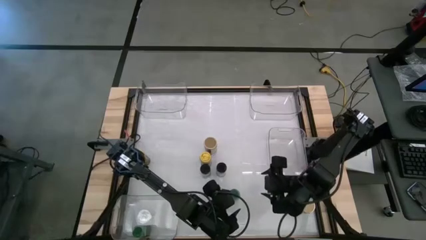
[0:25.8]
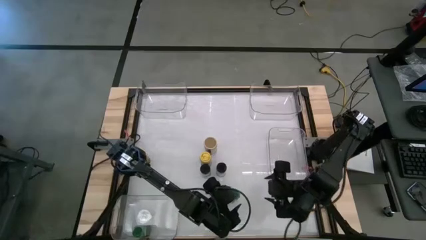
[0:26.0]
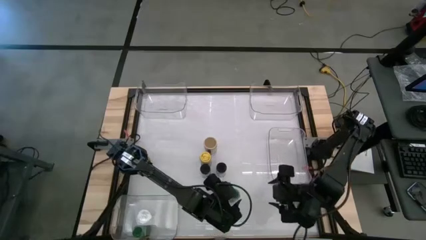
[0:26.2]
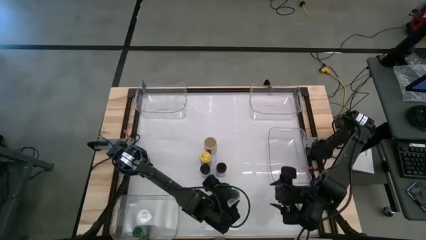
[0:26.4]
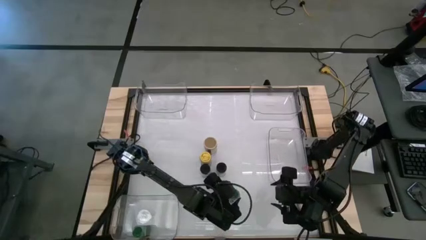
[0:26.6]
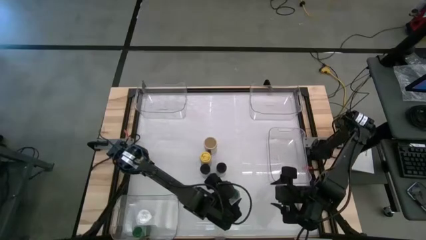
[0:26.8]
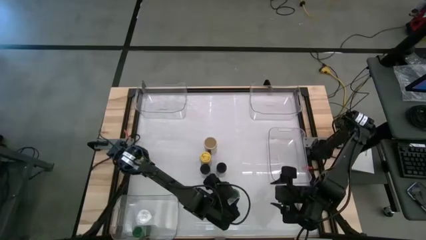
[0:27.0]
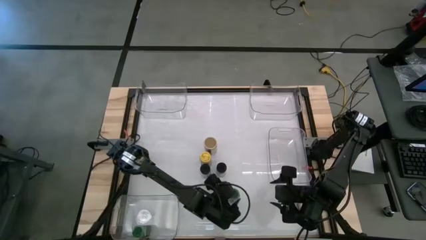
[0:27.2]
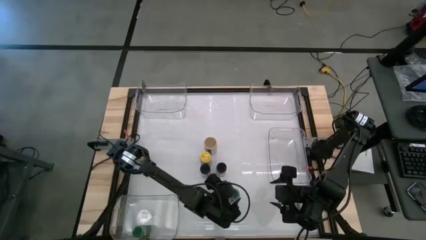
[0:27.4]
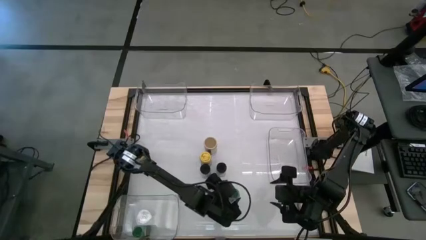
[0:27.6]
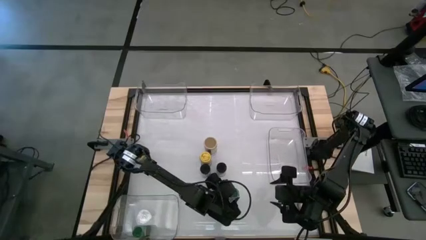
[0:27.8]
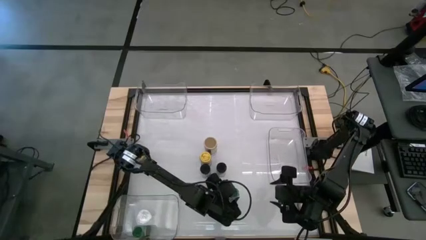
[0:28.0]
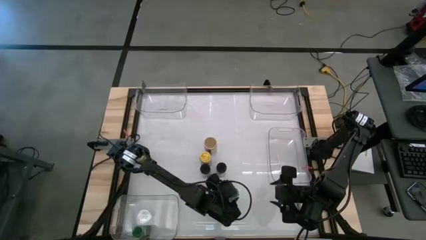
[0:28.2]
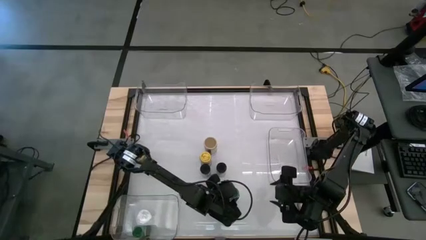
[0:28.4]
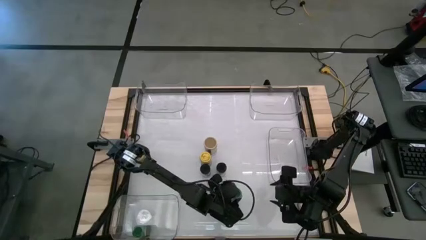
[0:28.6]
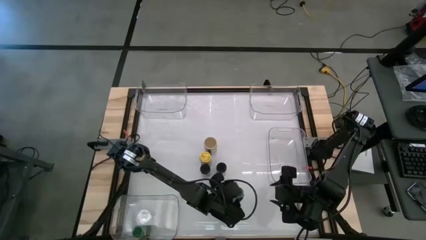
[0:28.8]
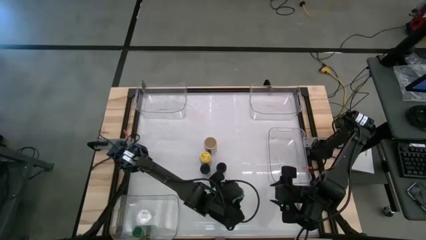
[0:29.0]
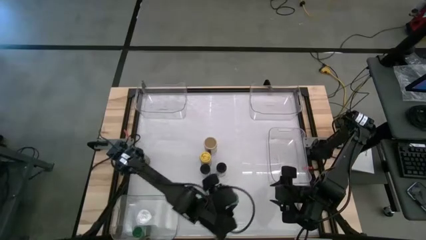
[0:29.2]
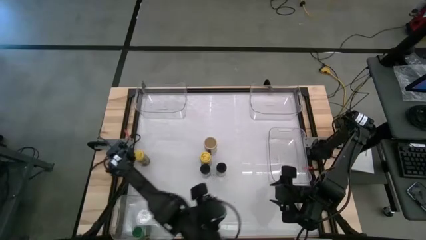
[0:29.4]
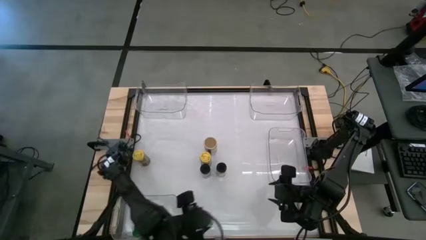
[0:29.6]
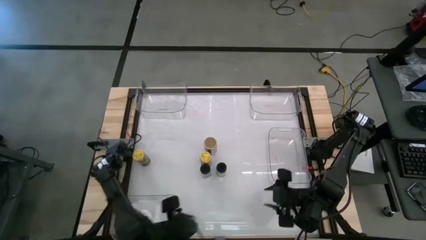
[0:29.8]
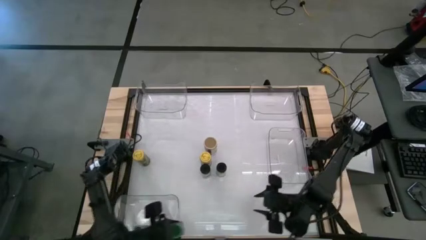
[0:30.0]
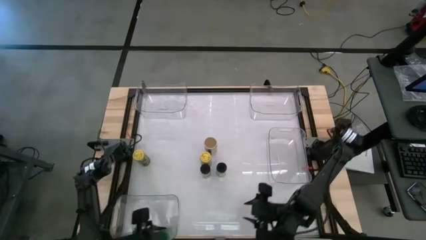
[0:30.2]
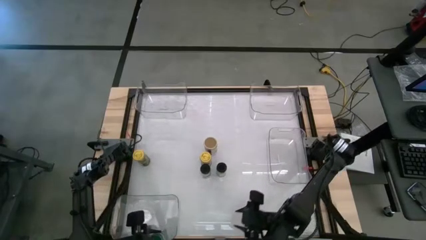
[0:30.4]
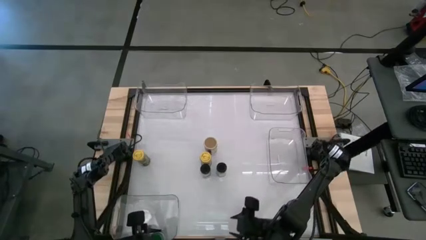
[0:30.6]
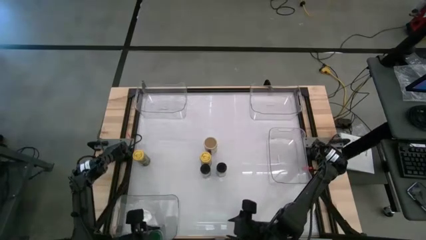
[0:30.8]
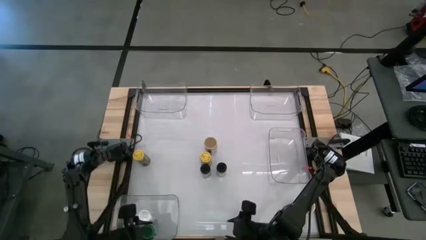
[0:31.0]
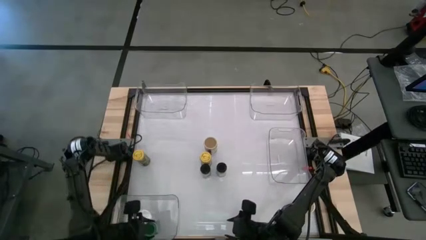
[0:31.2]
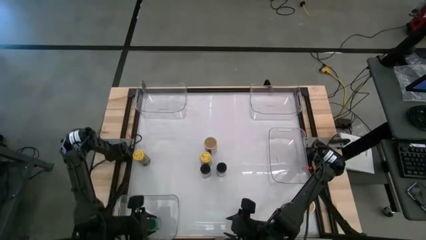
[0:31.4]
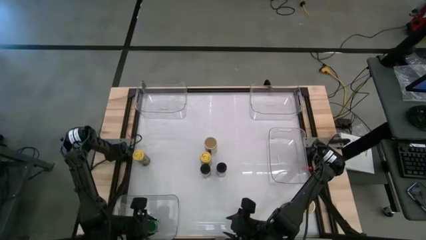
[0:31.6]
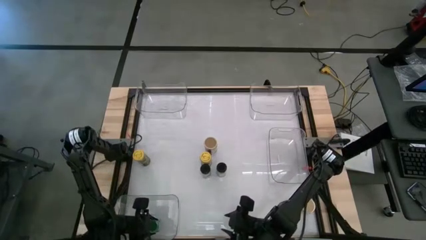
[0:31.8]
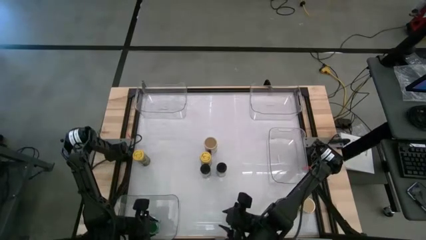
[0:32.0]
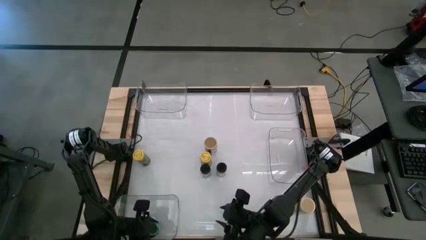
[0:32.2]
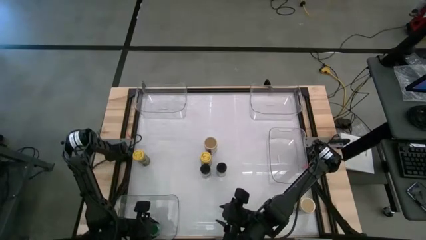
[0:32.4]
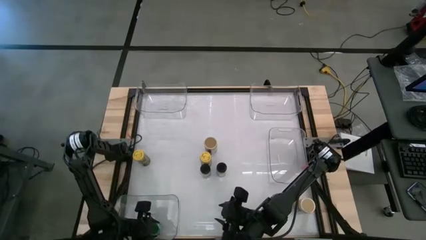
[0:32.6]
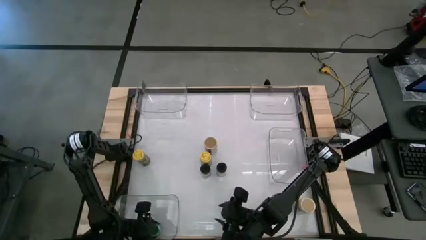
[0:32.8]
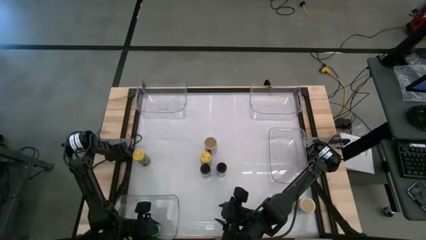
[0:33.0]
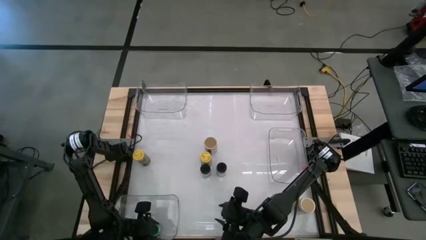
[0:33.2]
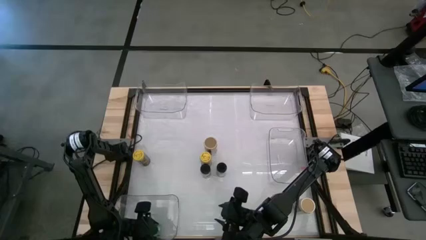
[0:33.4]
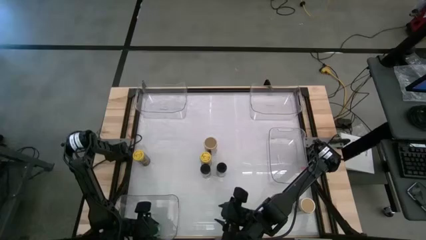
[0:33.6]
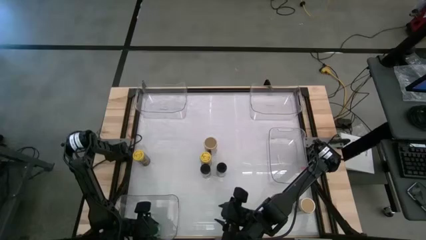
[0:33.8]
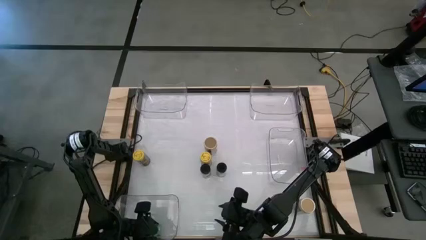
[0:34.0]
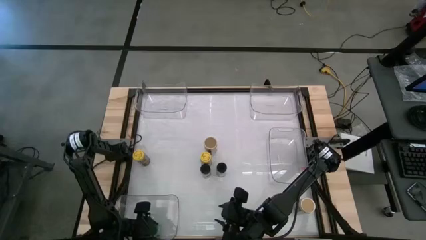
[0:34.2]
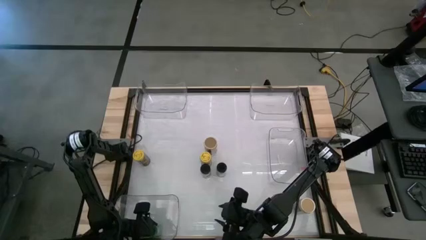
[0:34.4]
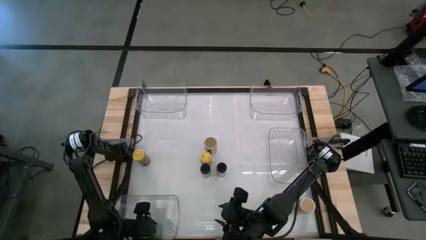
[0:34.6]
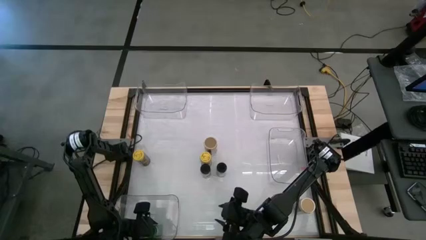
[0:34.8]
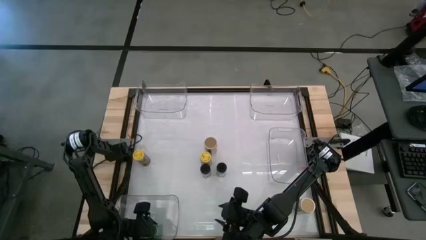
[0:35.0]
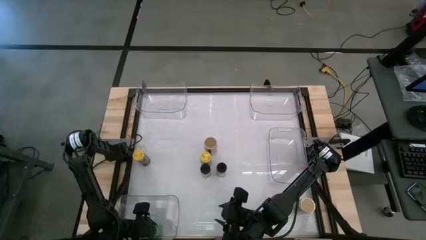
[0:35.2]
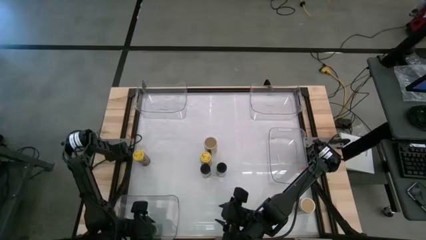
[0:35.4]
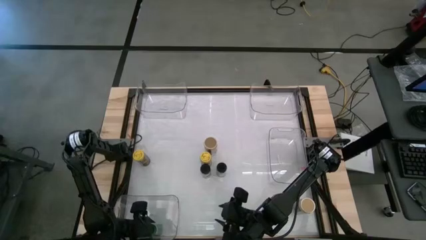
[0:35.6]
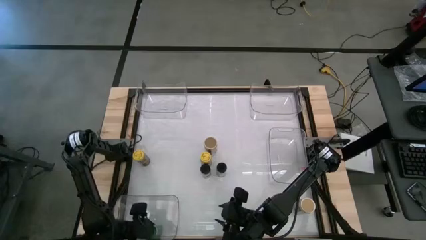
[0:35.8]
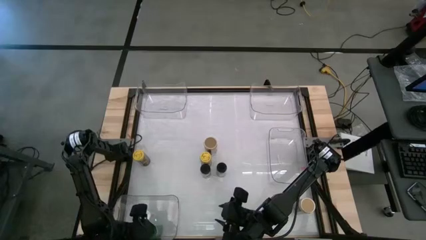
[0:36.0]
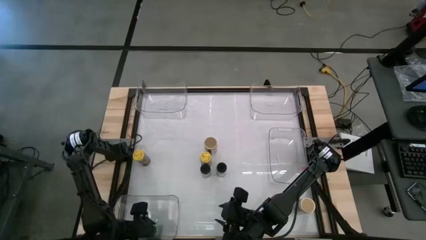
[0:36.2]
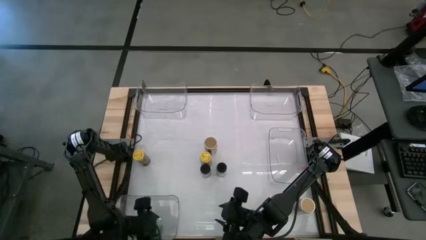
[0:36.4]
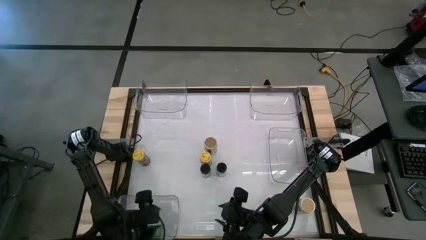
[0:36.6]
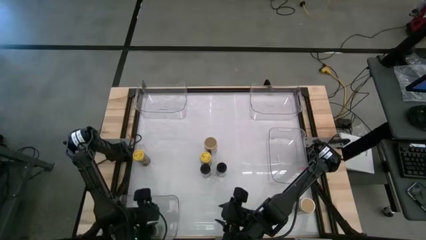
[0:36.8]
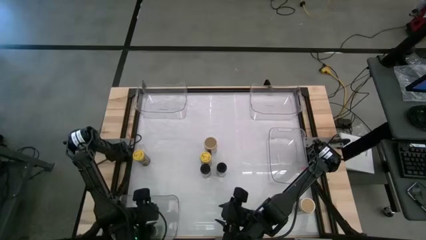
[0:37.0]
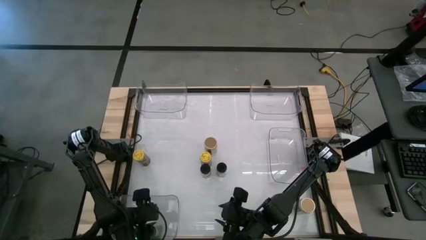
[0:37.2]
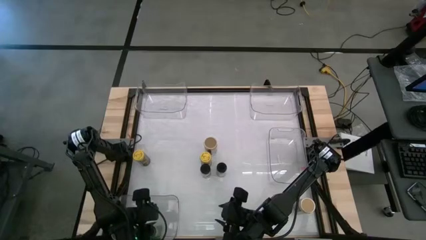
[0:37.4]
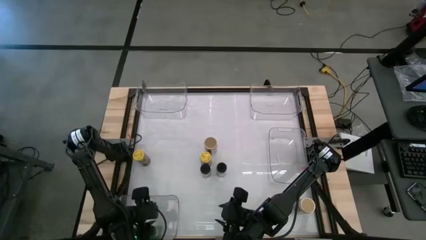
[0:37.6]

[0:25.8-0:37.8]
Task: Sort spices by type
Put the green seasoning bottle into the bottom transparent bin

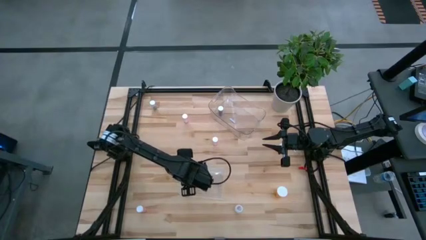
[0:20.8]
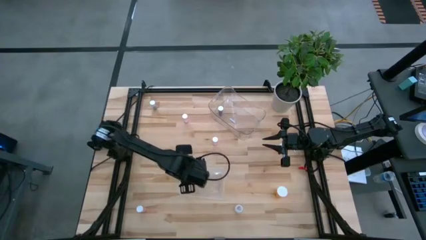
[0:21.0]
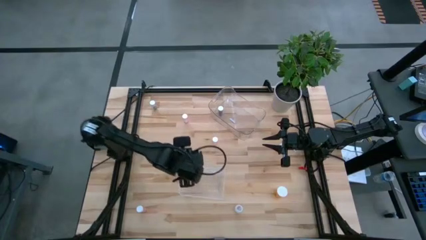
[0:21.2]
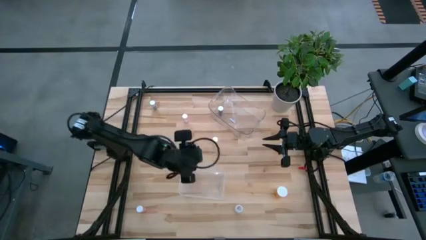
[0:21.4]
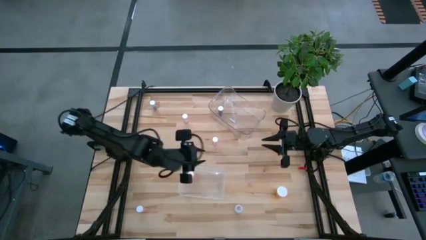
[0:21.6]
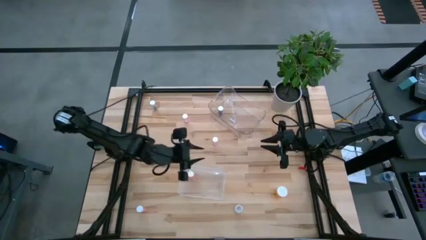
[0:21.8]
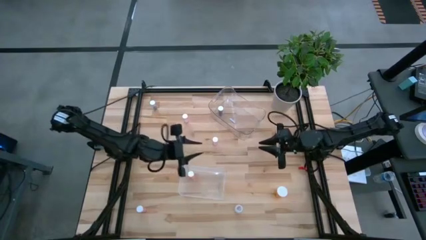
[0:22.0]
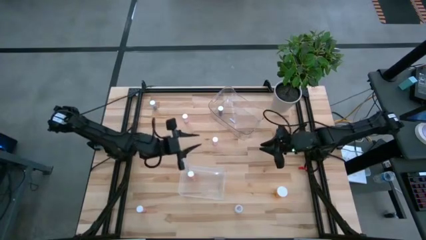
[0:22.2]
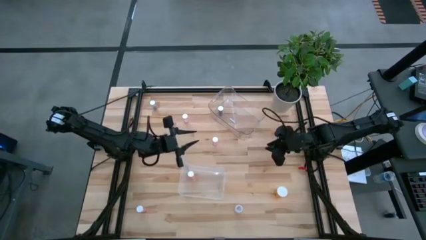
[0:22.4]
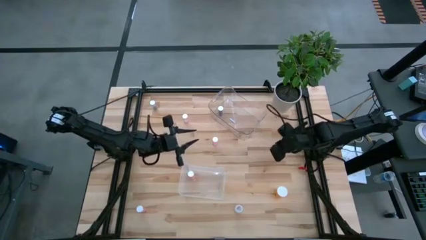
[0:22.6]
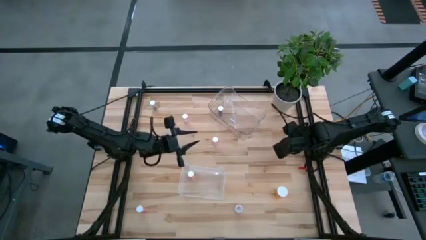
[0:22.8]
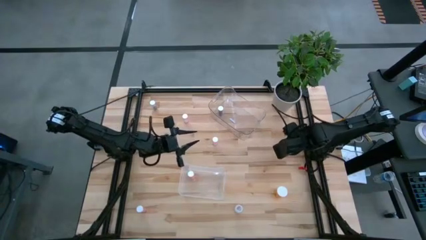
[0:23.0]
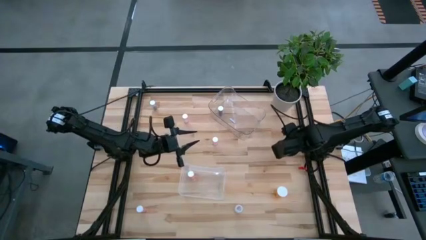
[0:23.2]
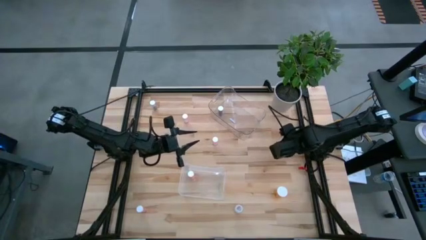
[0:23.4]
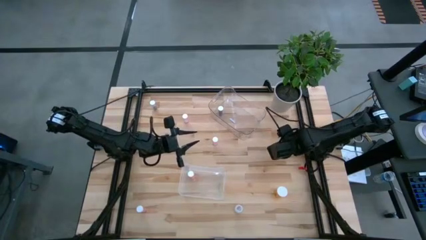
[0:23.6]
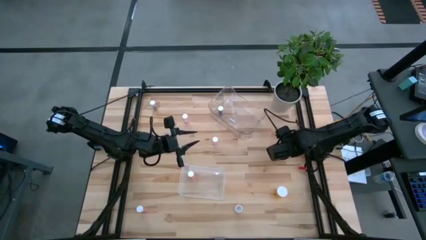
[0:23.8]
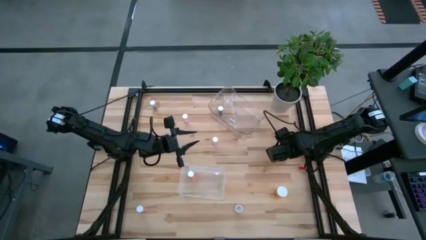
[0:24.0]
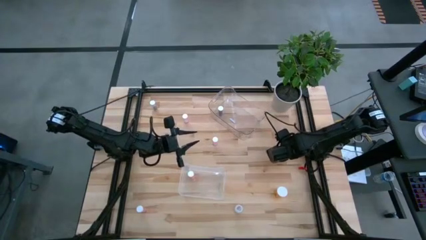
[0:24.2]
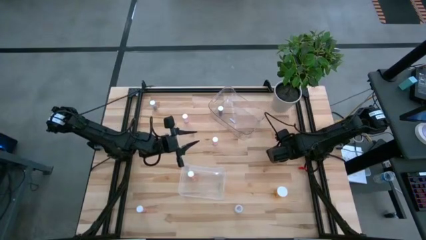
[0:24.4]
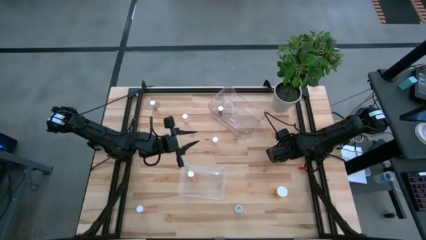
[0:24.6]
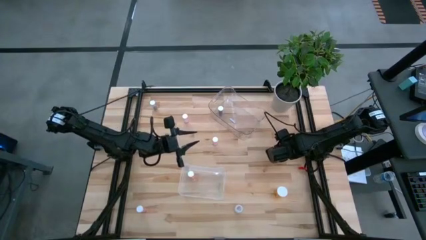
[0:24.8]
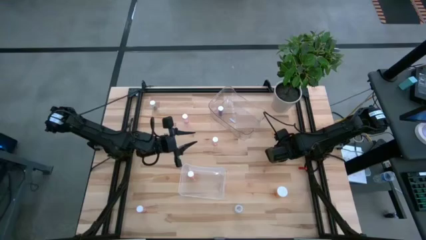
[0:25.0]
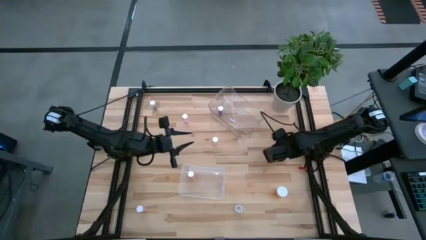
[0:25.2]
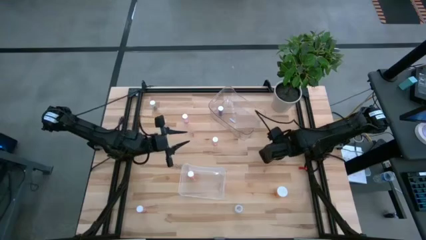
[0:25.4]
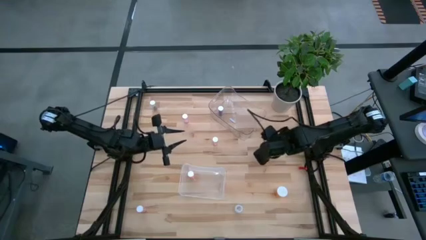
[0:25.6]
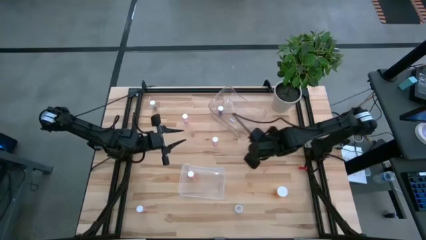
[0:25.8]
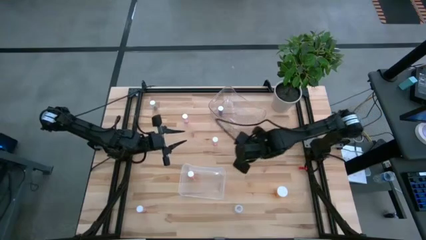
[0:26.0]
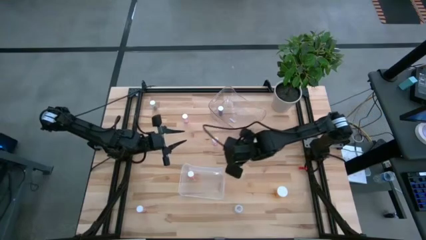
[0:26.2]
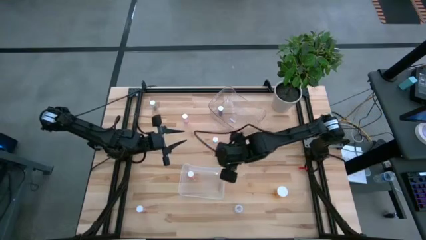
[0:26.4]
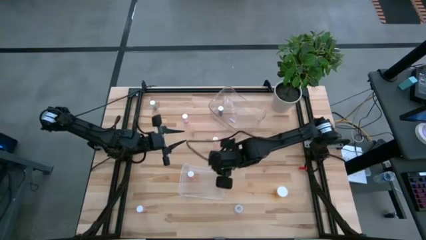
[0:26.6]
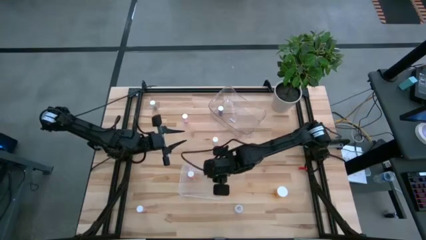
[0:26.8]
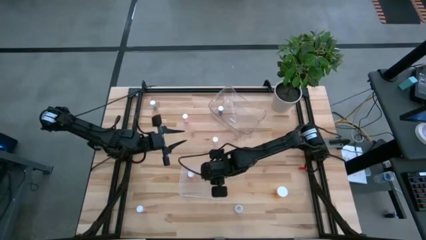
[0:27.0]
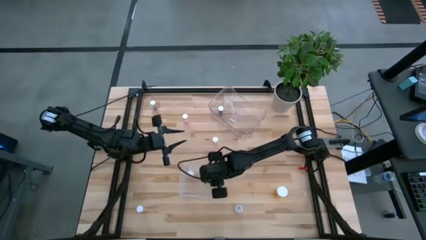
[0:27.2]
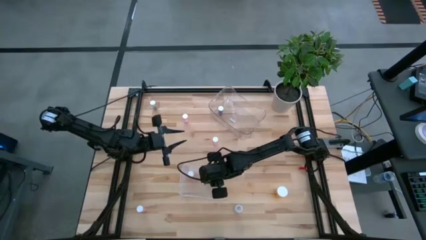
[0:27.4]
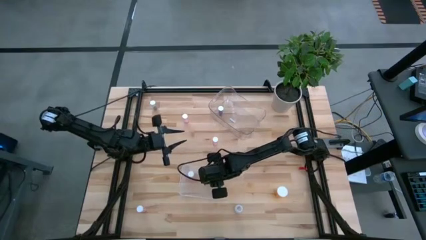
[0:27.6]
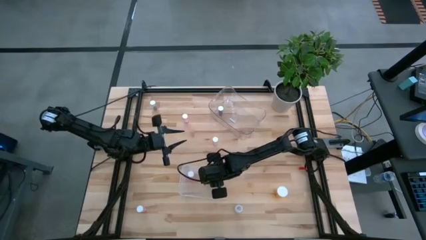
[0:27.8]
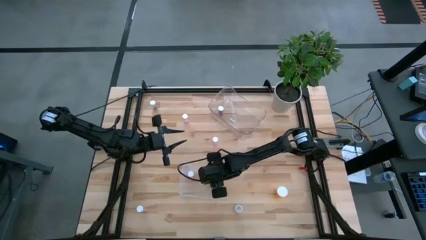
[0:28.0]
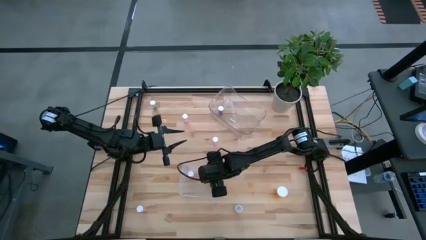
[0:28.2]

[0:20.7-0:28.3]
Task: Pick and place medicine bottles into bin by pill shape (circle, oval)
Put the orange tablet bottle into the bottom transparent bin
